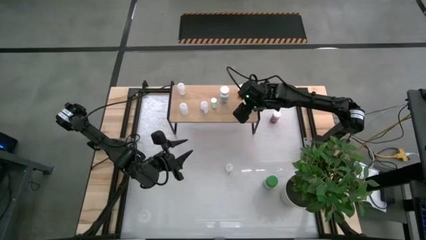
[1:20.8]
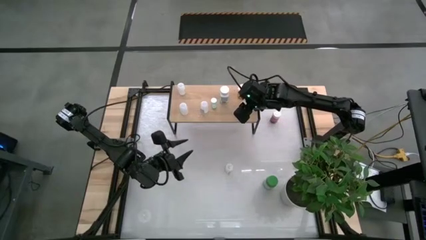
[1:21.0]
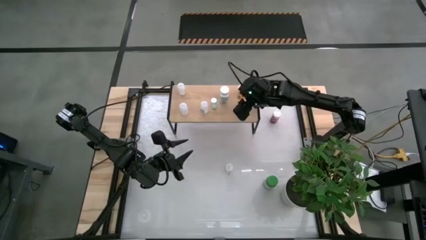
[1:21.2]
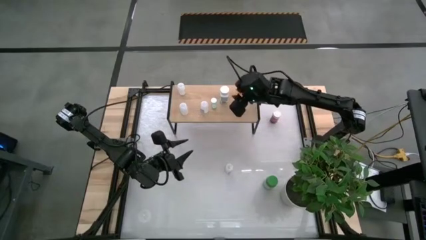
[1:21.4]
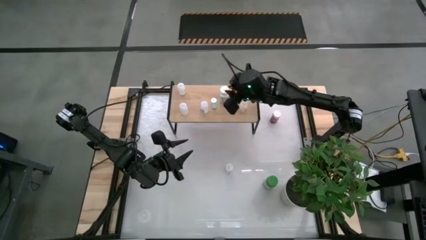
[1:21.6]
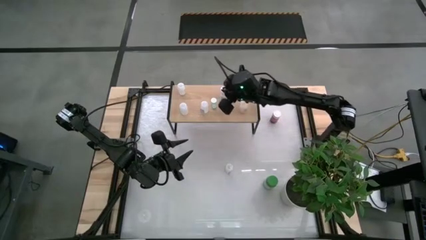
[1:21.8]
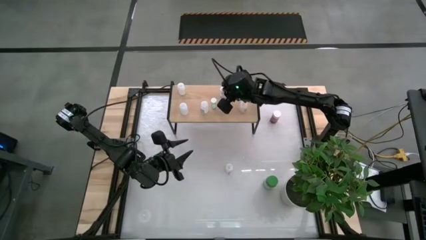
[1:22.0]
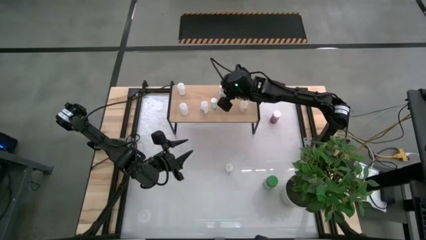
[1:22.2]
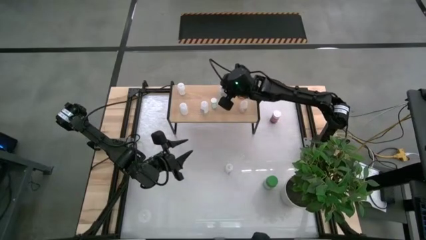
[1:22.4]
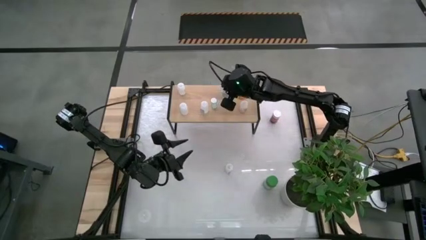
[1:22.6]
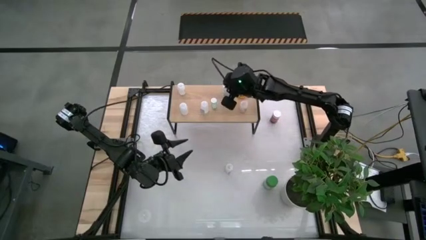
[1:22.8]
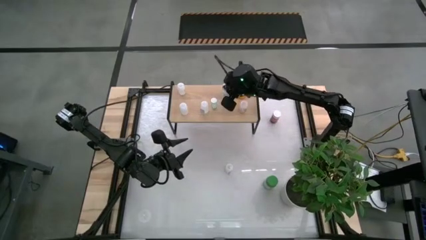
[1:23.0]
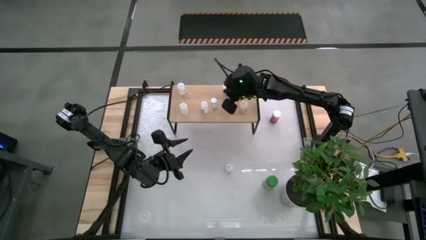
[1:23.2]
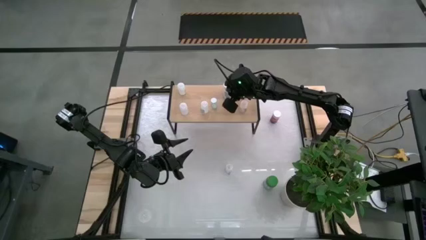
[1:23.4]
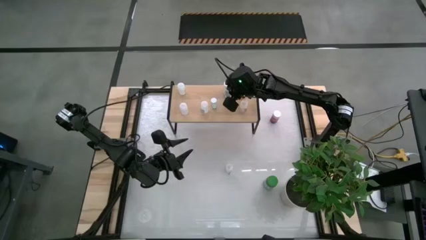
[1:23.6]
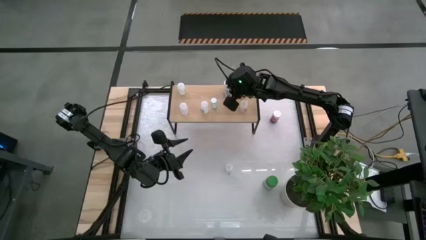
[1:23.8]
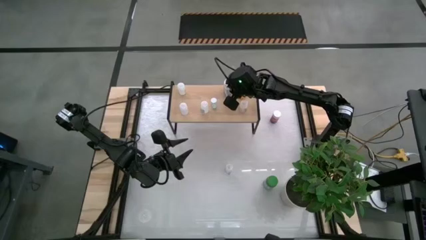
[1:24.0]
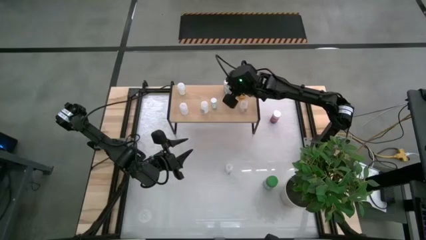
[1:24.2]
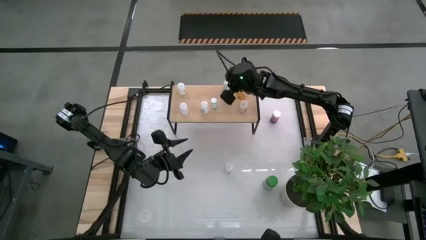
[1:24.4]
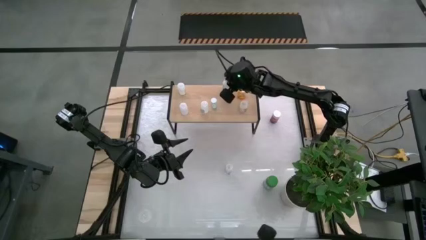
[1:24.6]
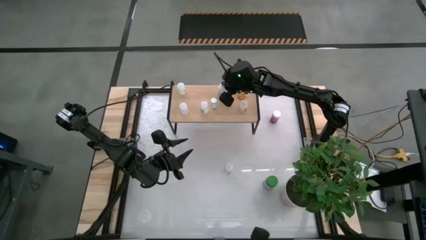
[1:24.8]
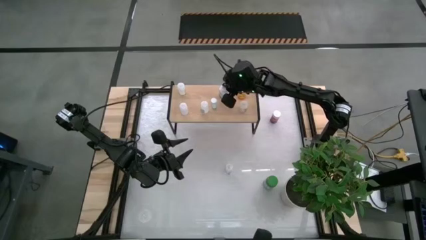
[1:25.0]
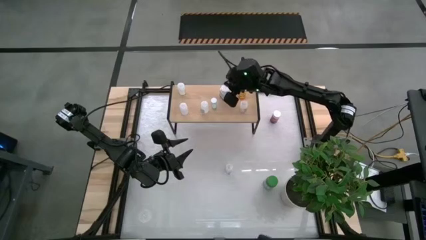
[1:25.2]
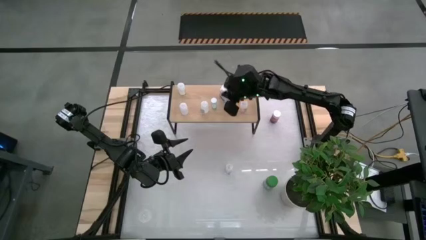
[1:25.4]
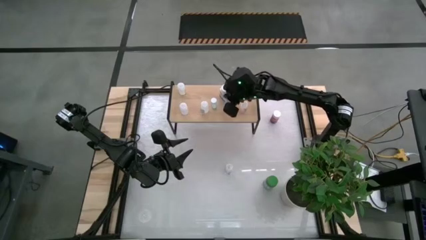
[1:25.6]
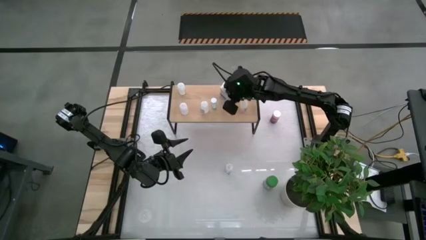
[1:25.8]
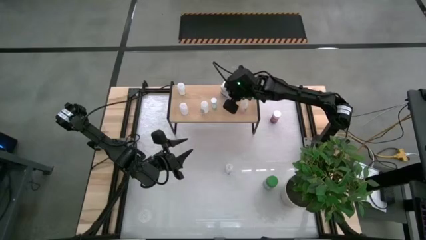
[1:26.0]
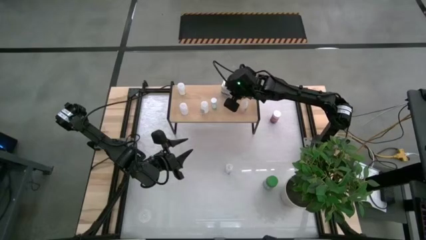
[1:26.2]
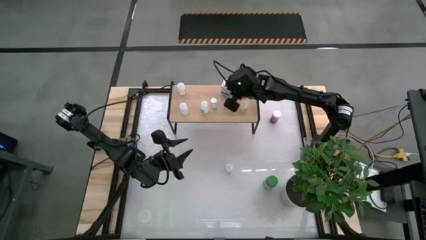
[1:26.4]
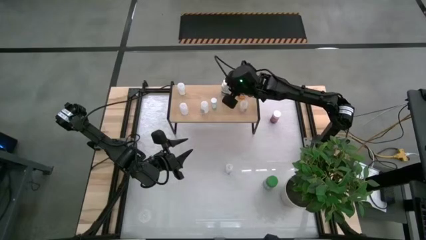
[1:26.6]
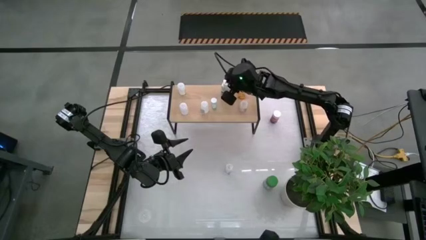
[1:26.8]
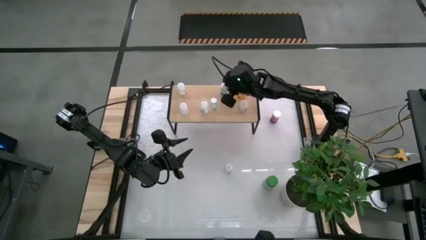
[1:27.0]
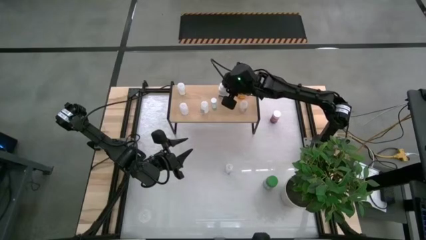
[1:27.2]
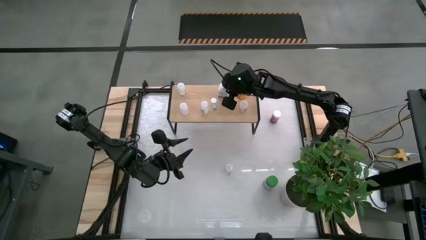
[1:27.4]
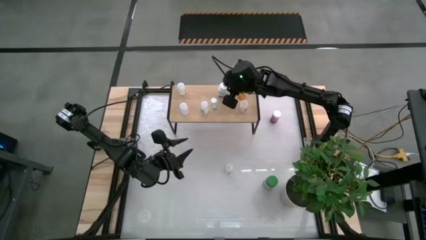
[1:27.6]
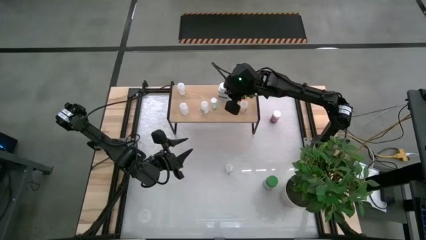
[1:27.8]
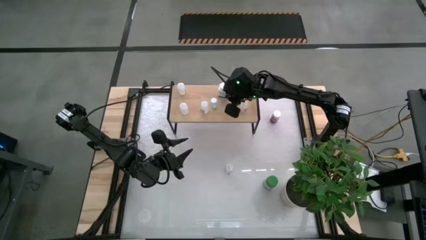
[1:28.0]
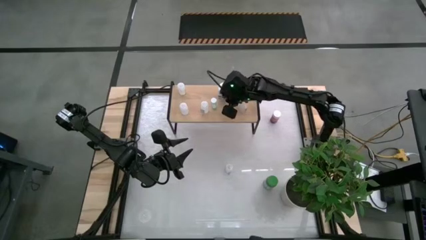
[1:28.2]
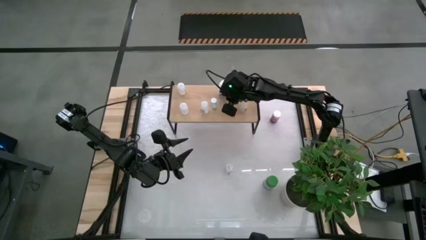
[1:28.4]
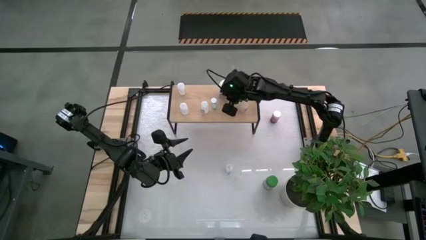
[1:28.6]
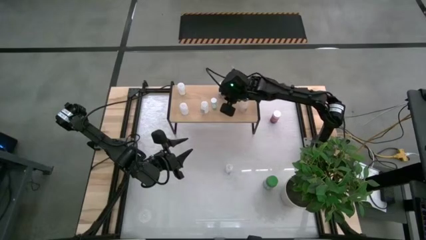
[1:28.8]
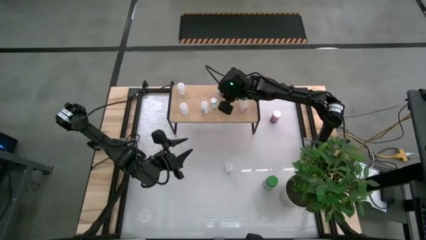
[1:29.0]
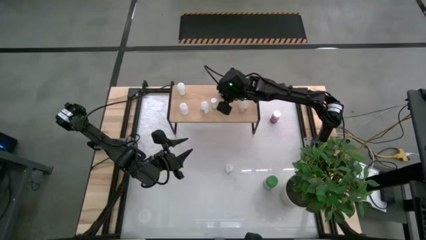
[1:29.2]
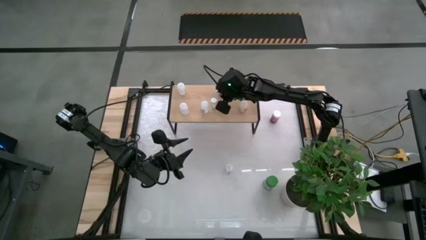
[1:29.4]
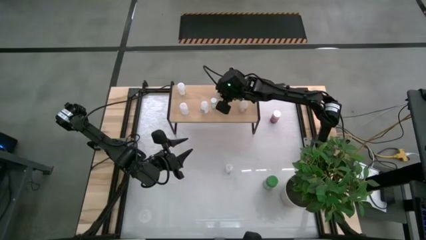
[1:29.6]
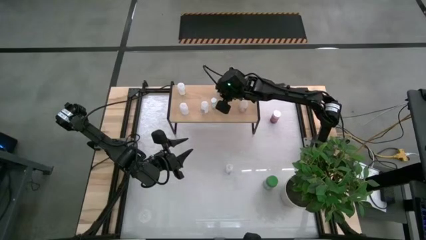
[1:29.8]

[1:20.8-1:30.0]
Task: Pick and place medicine bottles onto shelf by color
Adjust the white and blue pill bottle on the shelf

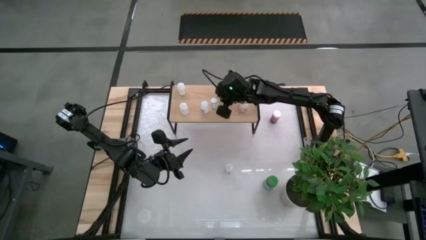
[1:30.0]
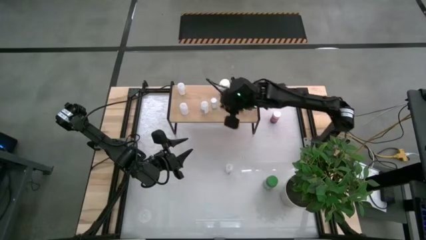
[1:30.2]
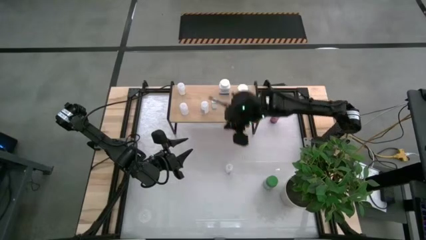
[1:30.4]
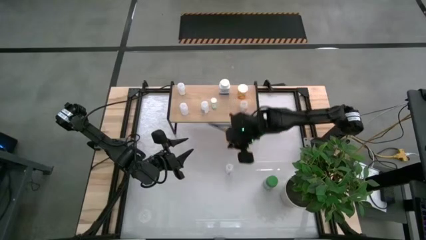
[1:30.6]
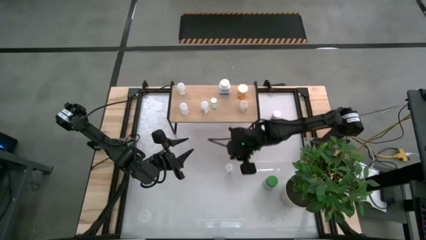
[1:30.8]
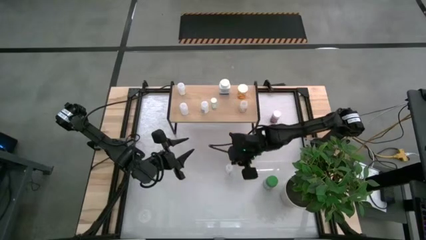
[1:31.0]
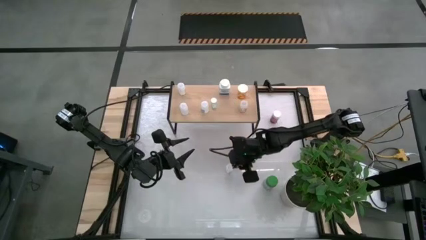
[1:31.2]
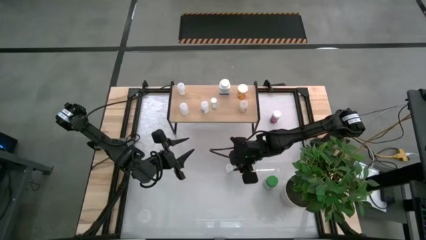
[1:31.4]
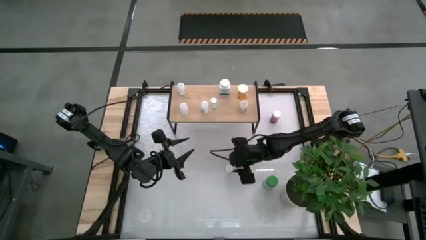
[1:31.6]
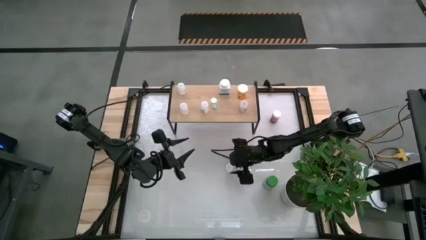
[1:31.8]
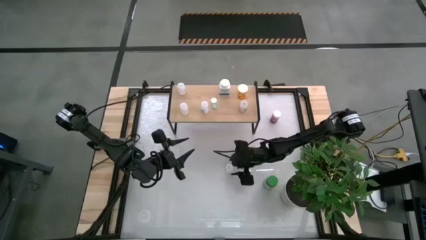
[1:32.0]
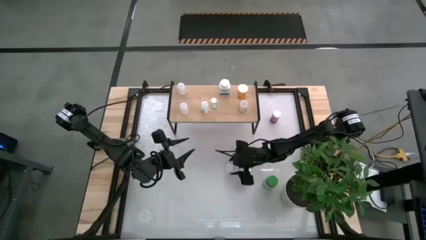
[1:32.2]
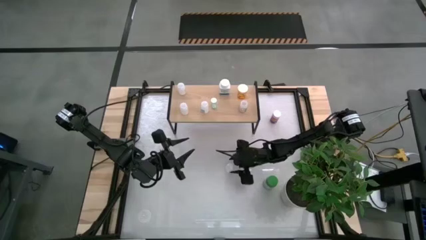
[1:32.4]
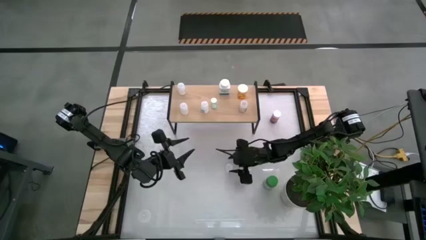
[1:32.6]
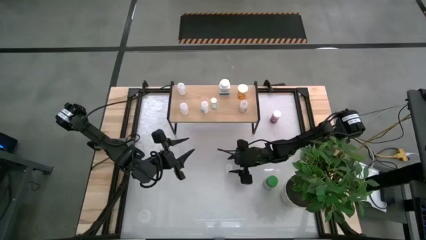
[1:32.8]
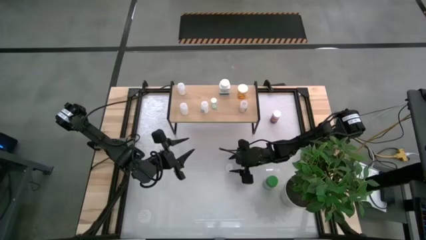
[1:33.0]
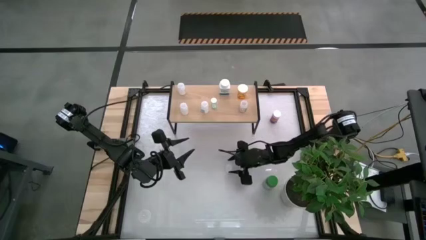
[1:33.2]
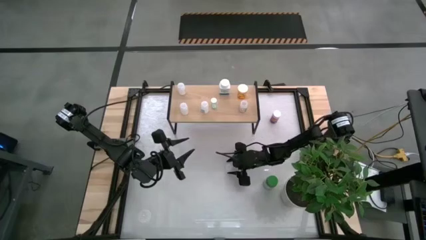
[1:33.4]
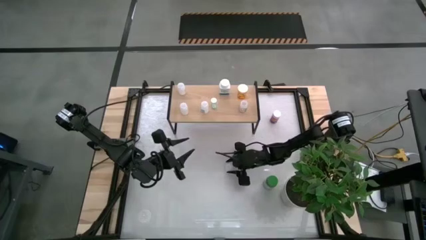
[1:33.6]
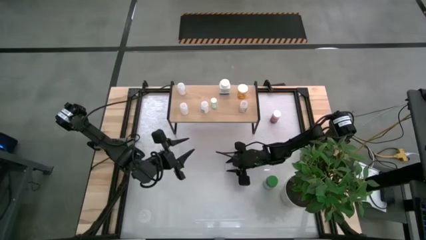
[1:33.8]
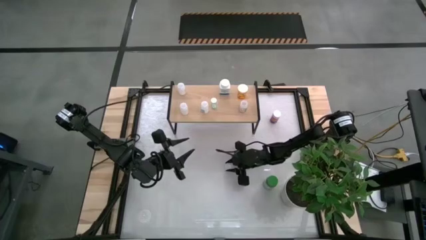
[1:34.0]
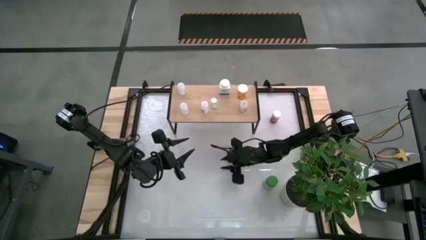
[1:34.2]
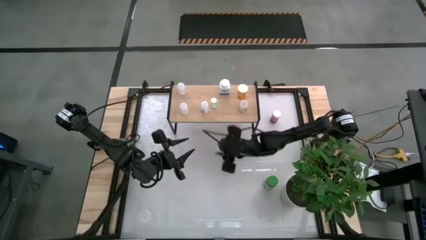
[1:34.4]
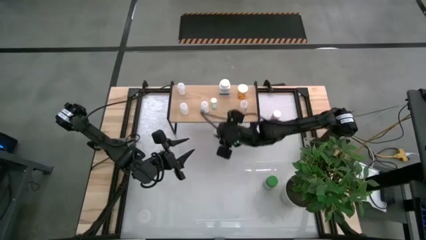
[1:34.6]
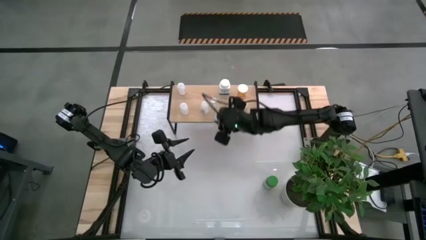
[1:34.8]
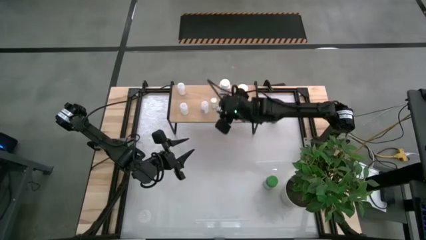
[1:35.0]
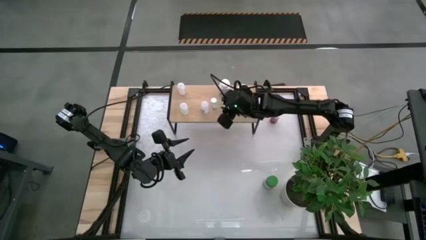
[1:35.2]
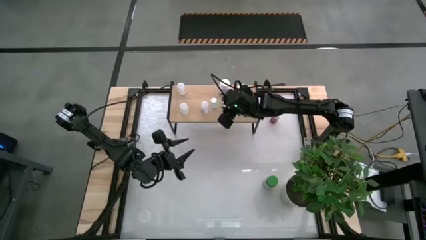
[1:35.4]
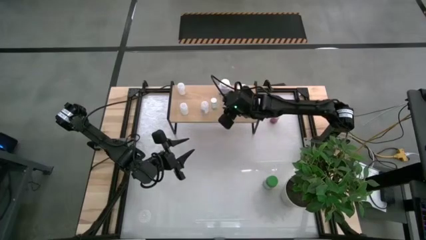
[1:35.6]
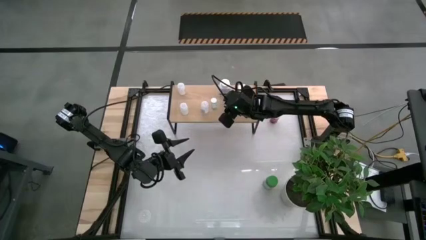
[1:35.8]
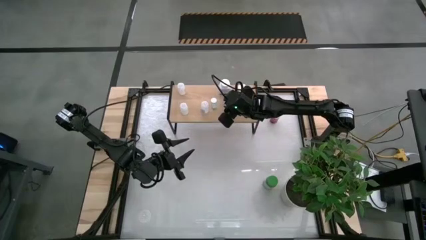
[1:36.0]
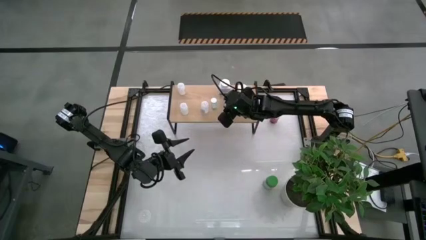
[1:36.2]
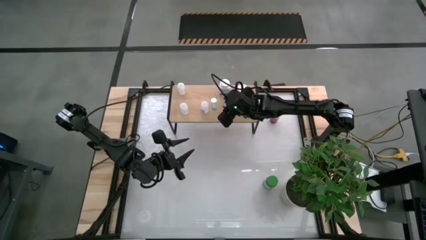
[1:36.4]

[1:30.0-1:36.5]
Put the white pill bottle on the shelf
